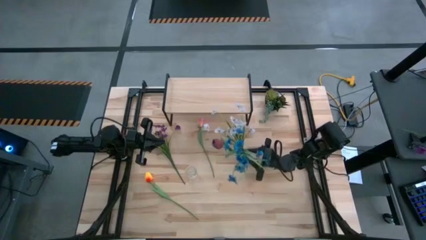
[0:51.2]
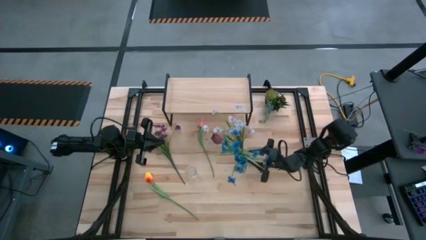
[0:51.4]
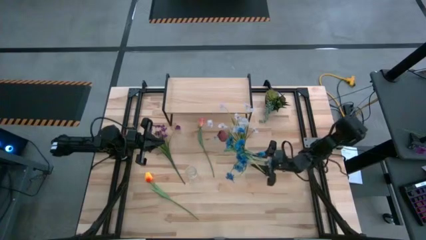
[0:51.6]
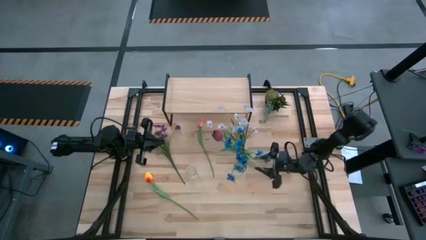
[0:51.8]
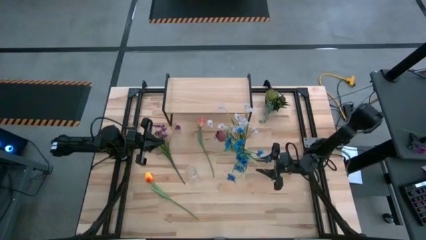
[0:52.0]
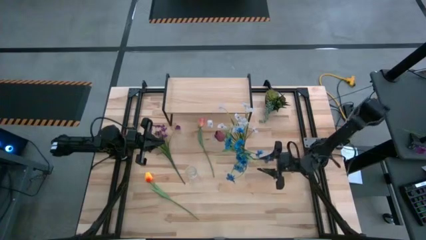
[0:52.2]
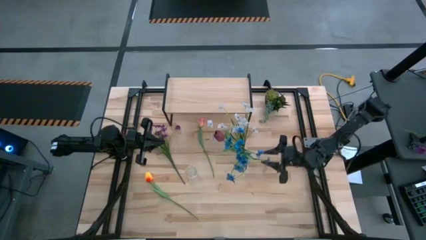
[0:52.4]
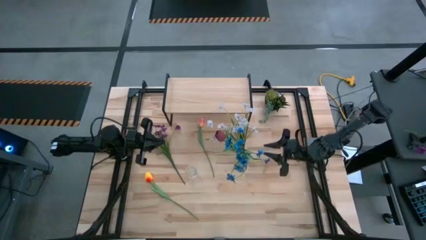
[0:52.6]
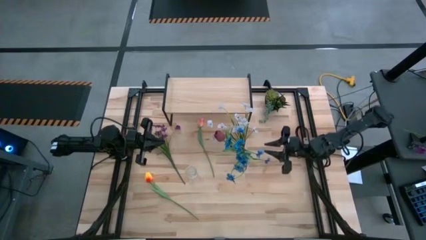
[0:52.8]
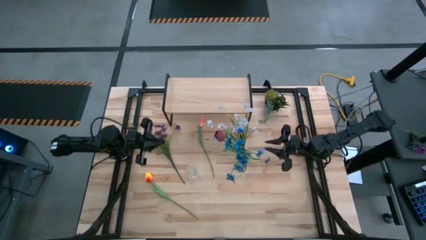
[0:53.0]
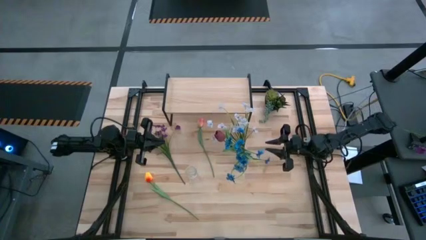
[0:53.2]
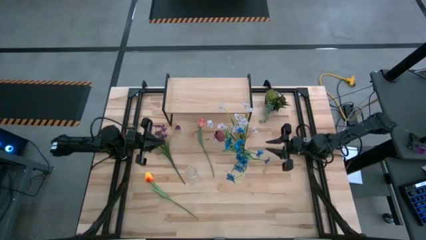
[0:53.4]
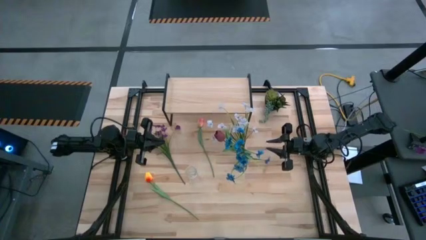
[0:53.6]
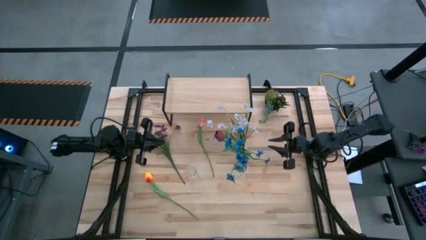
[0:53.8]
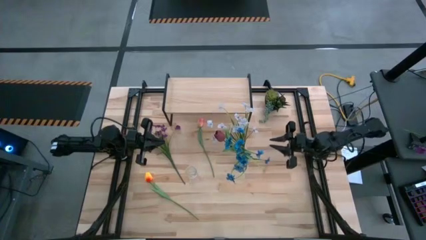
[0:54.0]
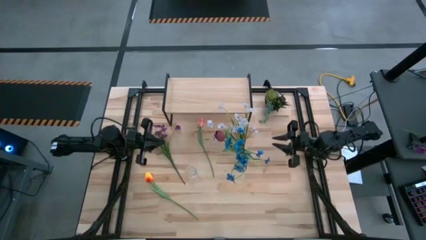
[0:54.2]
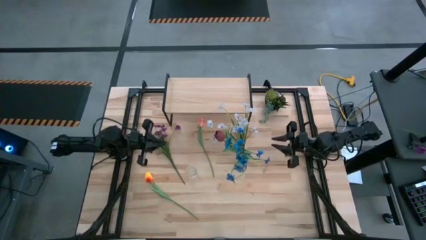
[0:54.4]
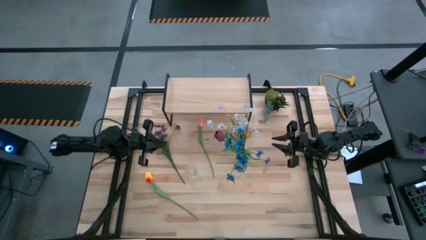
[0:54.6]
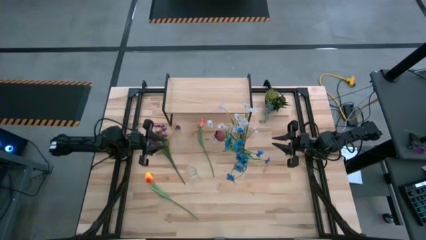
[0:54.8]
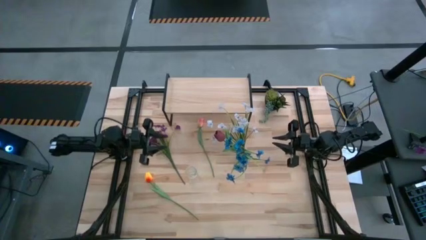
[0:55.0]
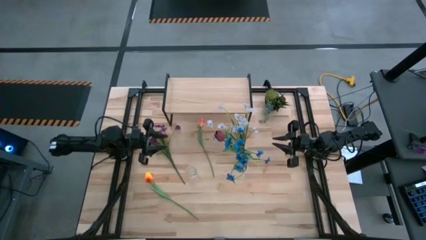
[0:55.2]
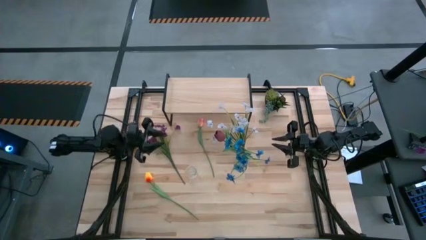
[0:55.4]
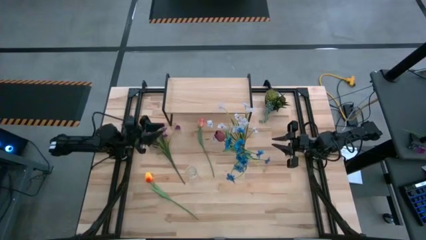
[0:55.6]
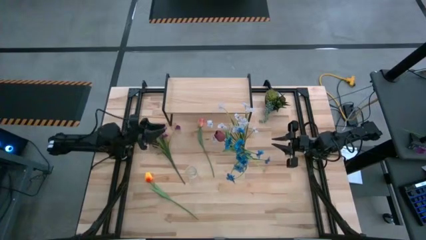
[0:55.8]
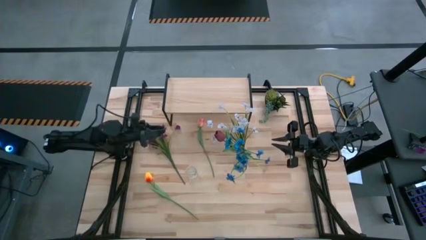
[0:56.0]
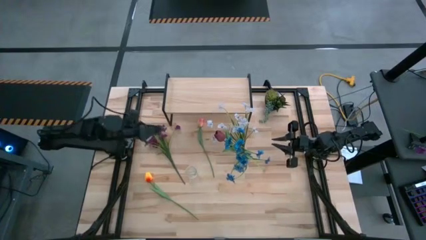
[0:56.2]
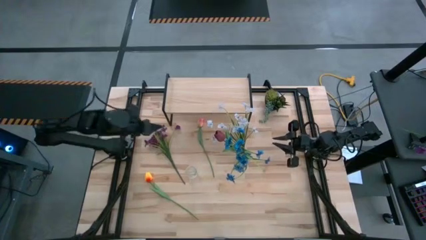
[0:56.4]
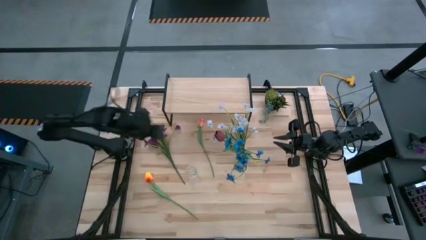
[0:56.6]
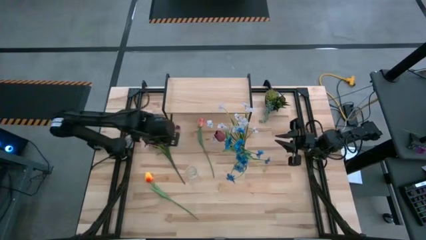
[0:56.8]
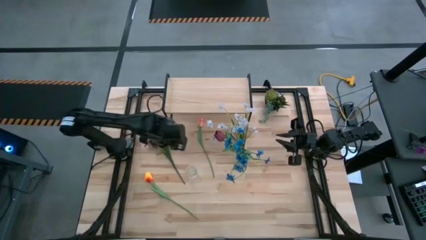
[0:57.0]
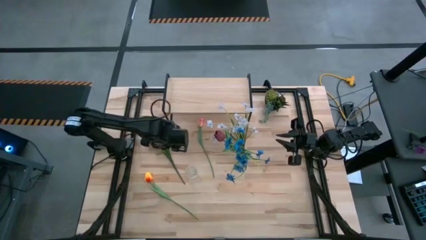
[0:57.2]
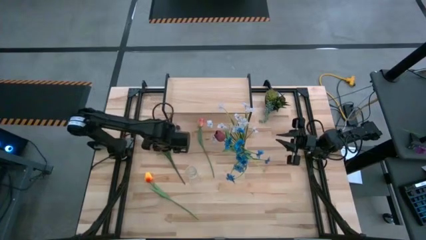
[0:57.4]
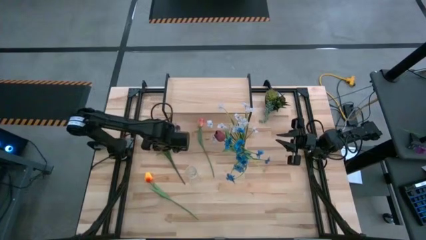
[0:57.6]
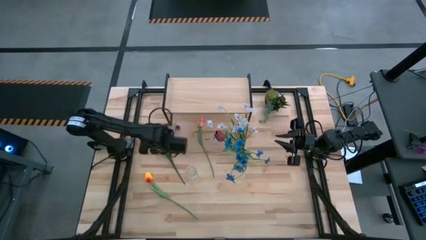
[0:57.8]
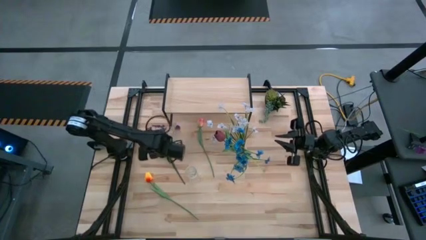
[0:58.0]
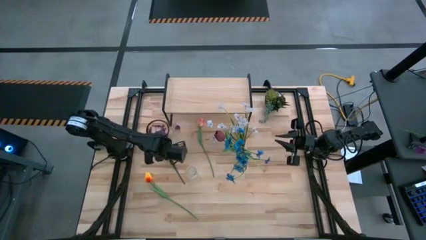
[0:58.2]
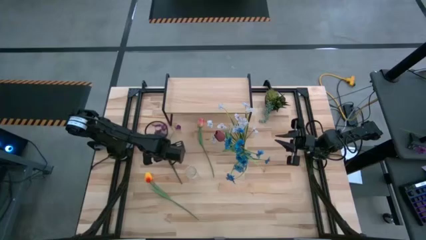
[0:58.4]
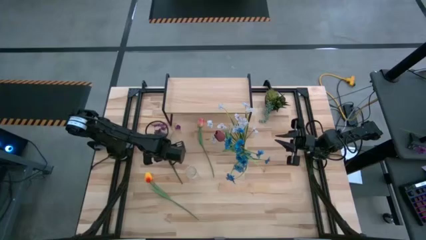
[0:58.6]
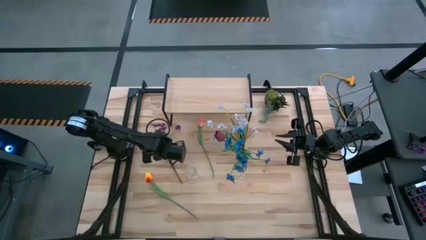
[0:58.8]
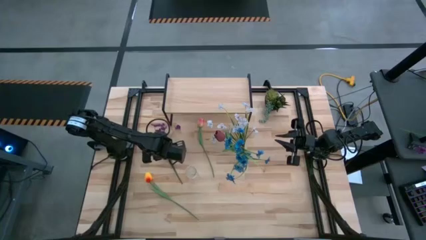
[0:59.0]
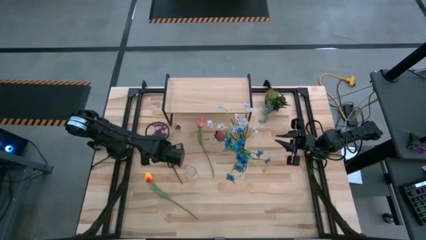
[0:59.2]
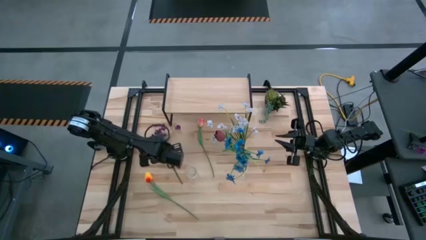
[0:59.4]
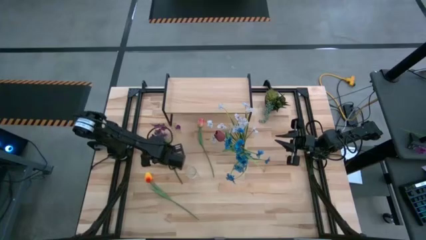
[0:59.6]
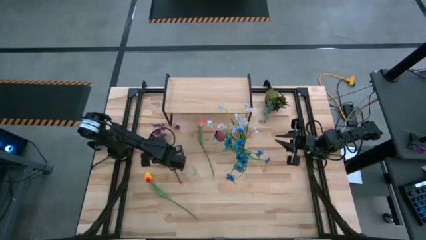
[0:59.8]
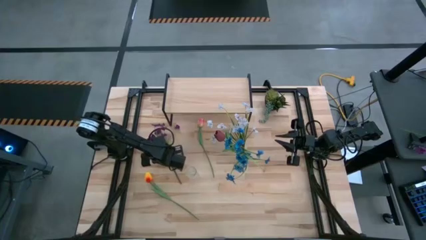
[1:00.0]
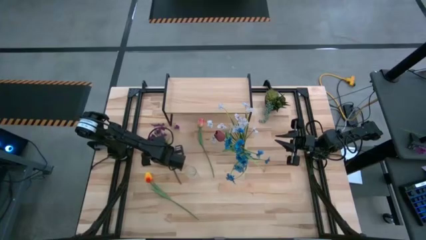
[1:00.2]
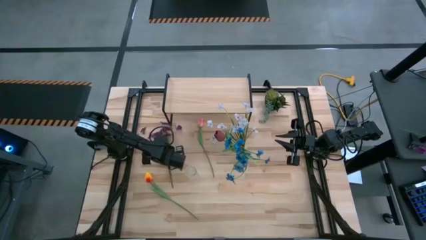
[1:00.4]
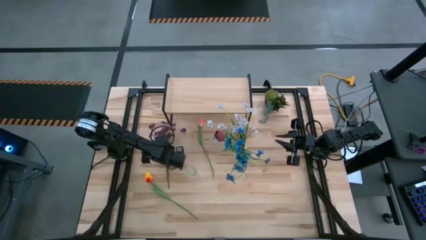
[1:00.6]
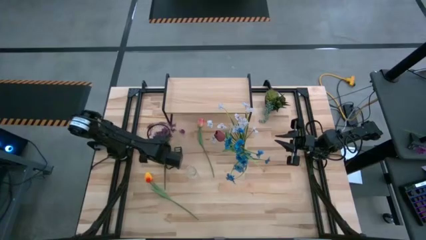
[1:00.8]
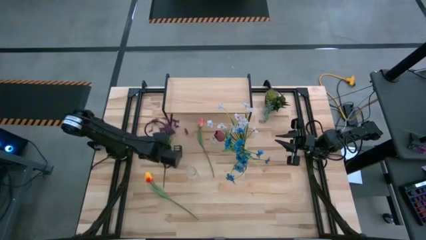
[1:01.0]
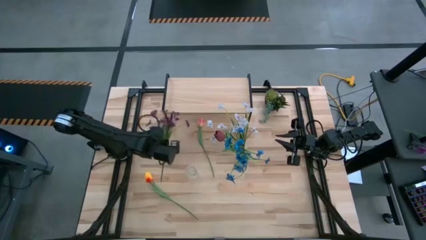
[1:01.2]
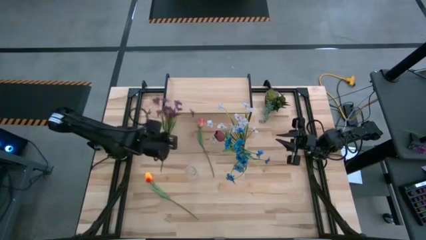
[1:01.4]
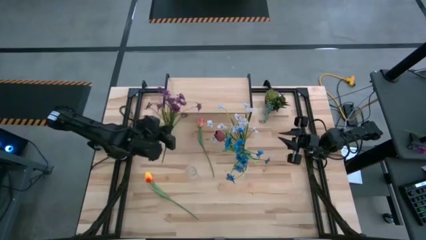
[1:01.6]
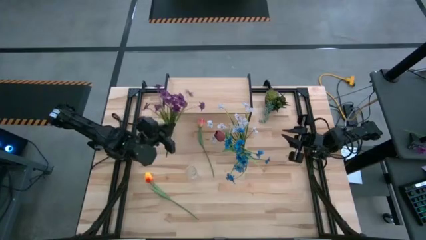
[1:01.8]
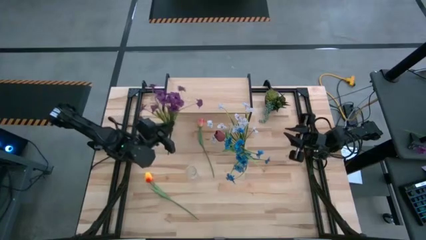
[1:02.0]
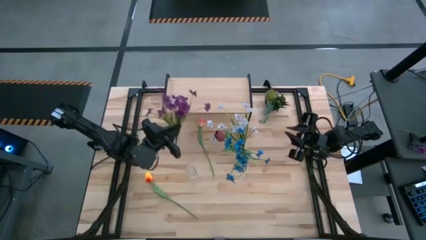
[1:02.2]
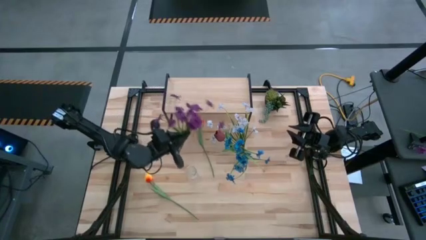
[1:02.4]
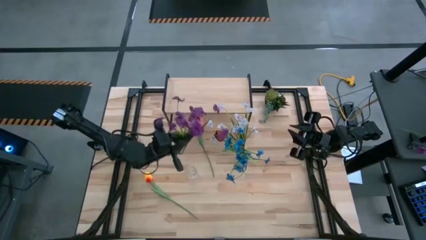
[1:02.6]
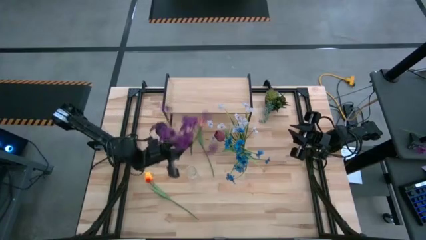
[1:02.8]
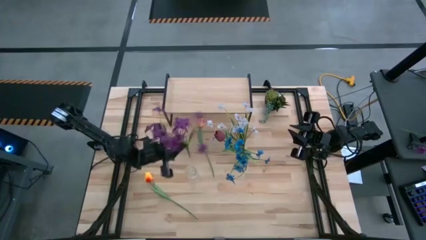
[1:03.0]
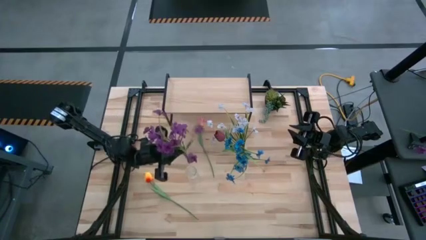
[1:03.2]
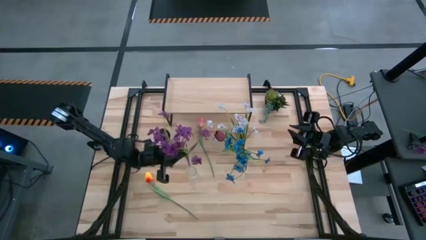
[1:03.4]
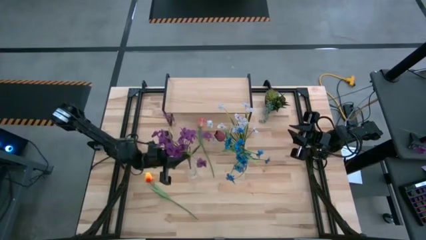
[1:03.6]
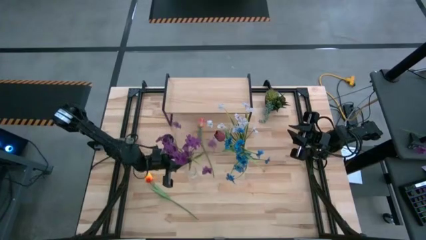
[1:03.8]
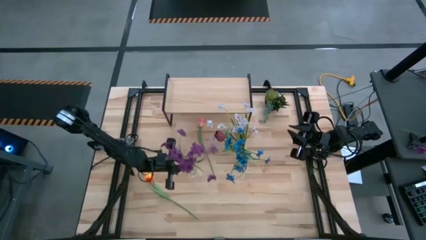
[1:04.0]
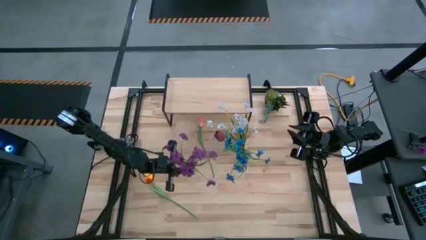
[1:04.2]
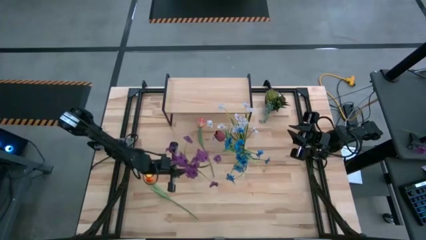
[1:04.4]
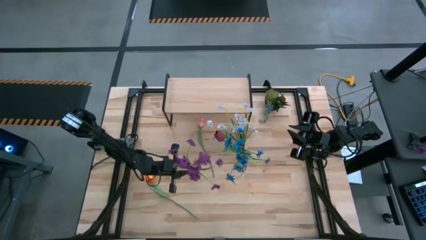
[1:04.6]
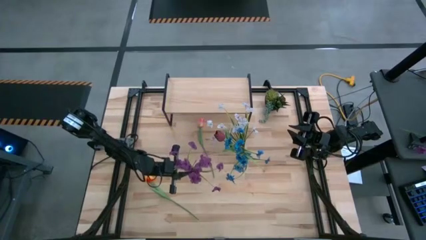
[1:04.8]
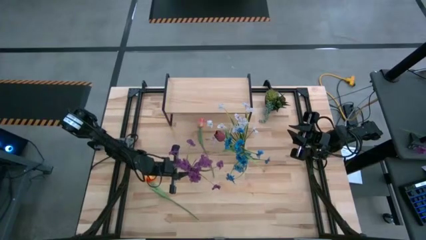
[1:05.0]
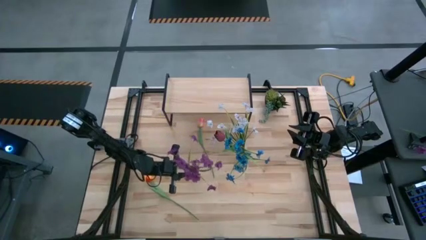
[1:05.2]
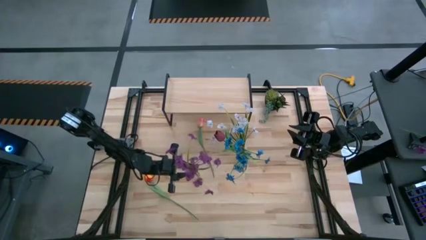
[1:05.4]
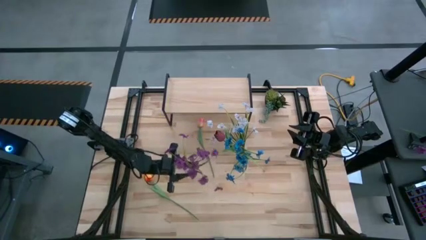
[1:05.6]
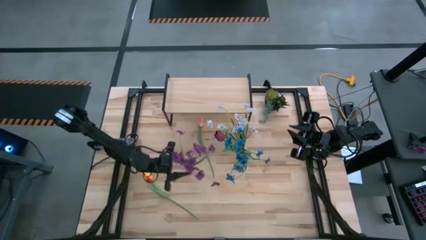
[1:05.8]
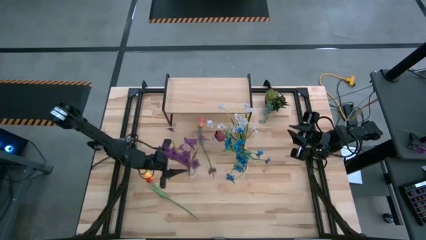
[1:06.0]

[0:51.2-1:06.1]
Task: Pick and place flowers into a vace then onto a shelf
Put the purple flowers into the left crystal vase
